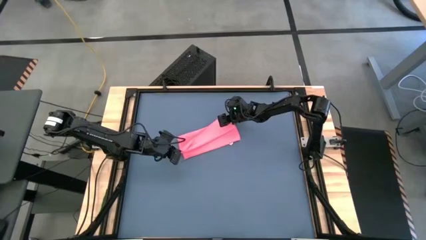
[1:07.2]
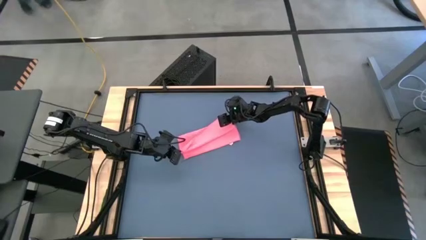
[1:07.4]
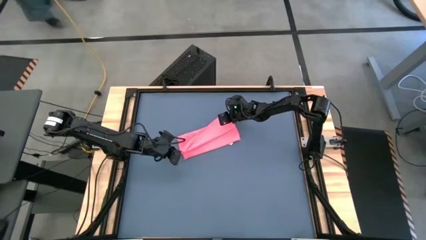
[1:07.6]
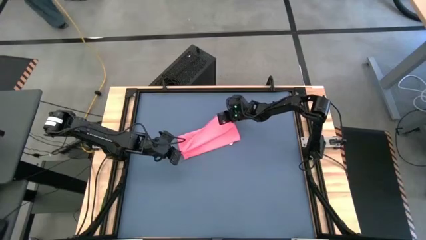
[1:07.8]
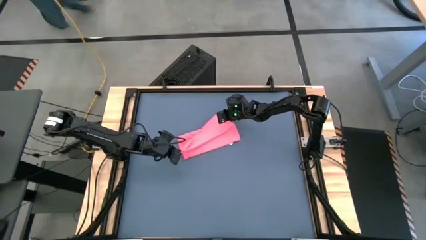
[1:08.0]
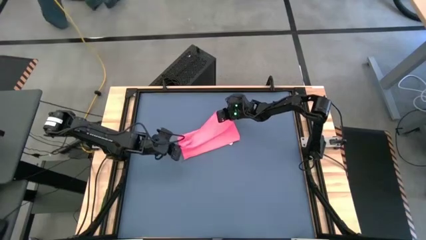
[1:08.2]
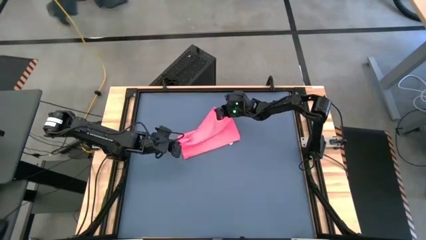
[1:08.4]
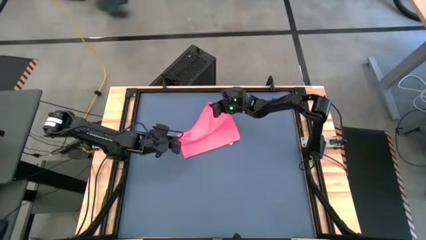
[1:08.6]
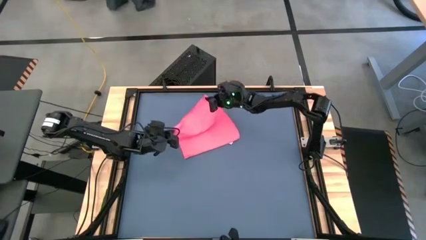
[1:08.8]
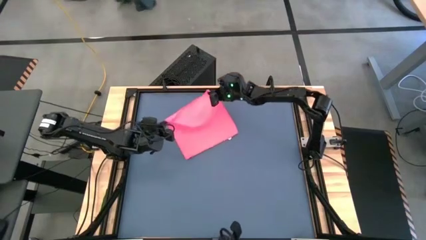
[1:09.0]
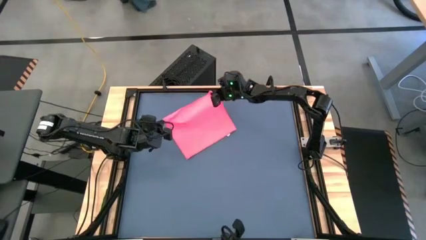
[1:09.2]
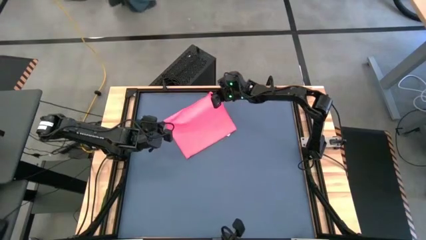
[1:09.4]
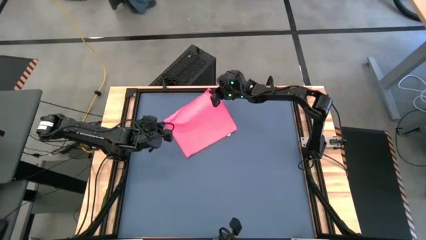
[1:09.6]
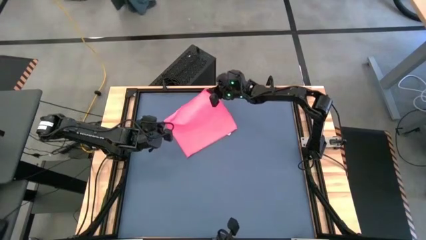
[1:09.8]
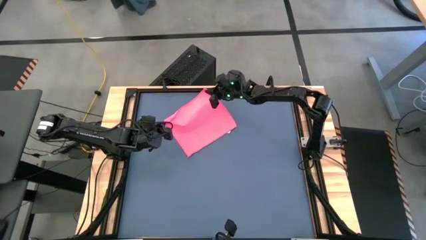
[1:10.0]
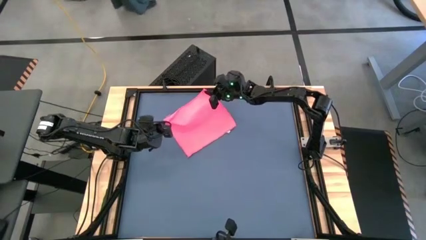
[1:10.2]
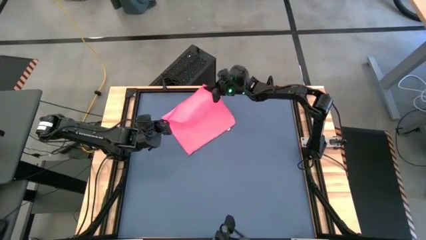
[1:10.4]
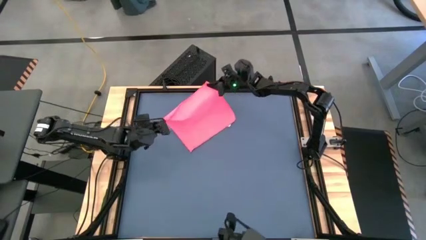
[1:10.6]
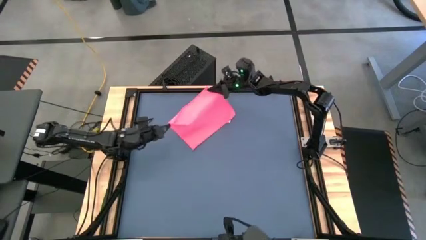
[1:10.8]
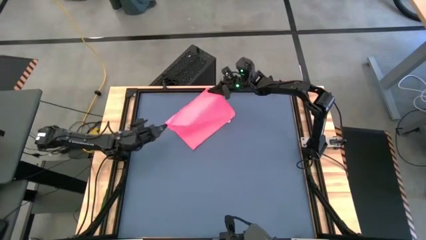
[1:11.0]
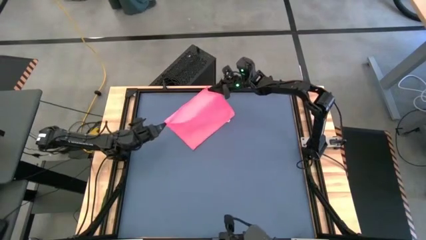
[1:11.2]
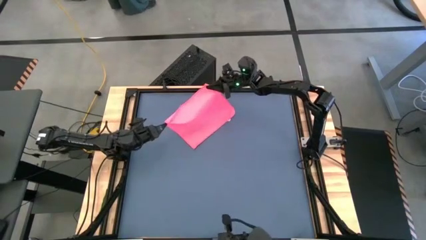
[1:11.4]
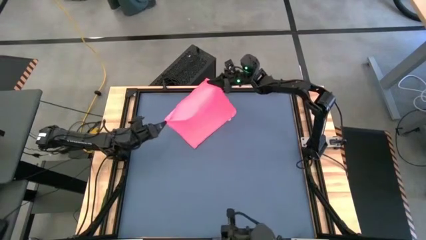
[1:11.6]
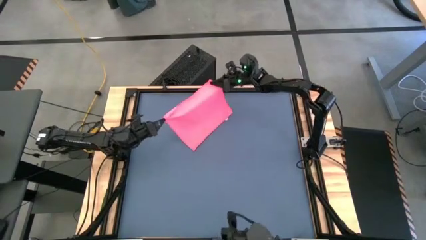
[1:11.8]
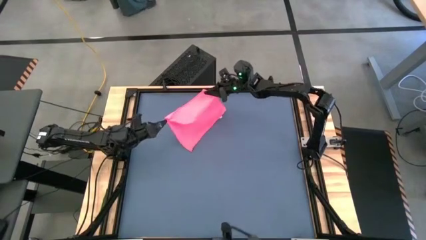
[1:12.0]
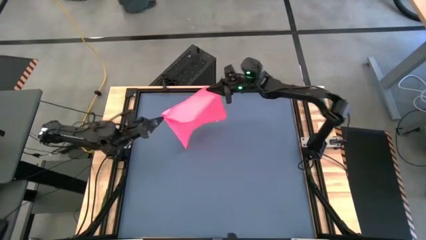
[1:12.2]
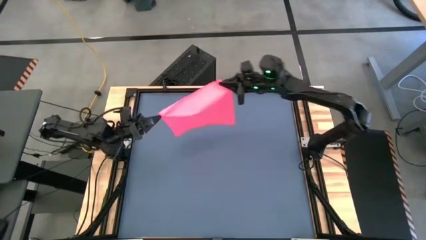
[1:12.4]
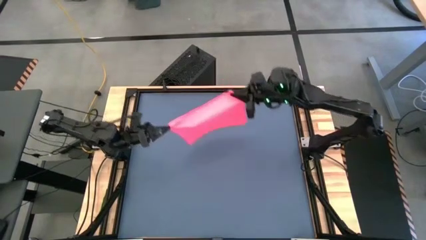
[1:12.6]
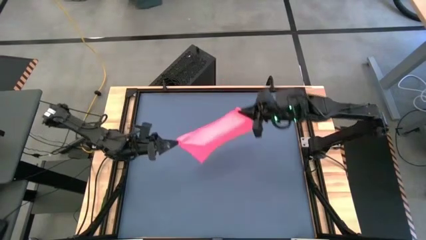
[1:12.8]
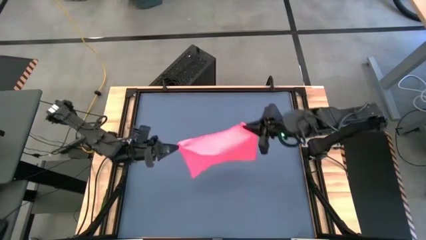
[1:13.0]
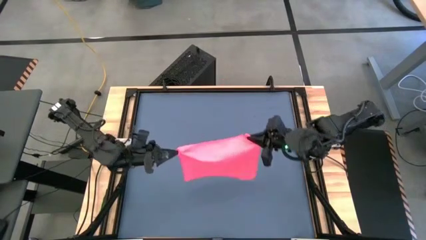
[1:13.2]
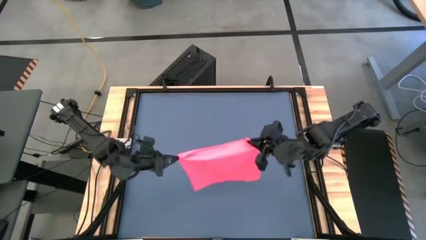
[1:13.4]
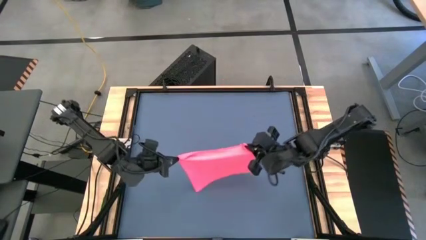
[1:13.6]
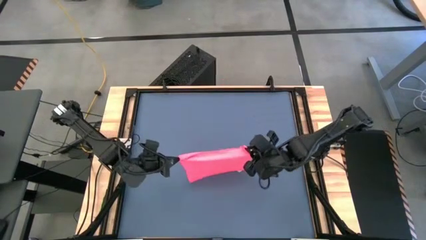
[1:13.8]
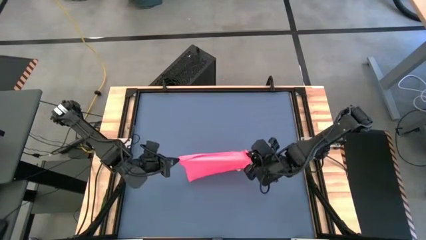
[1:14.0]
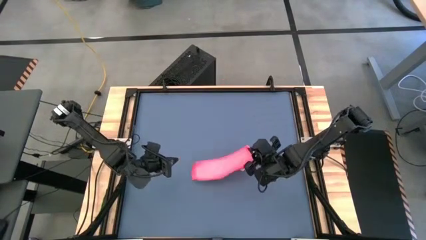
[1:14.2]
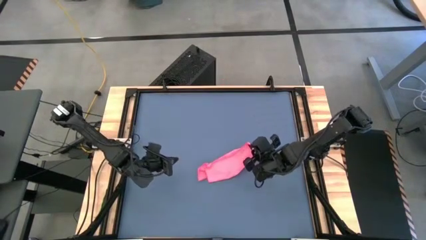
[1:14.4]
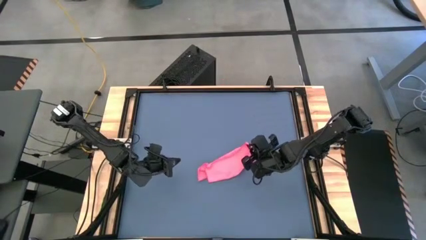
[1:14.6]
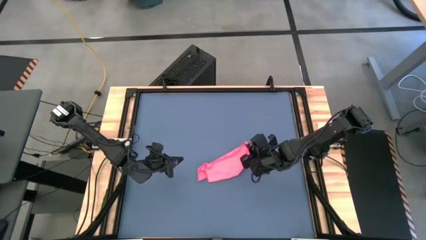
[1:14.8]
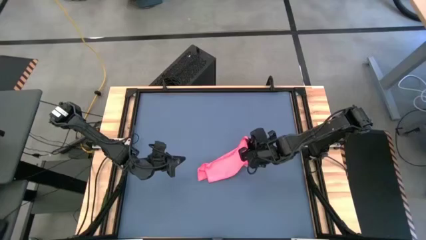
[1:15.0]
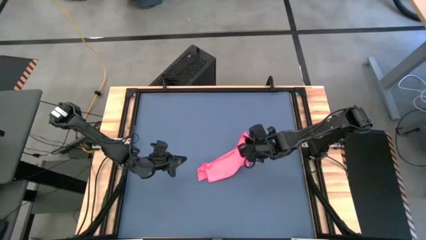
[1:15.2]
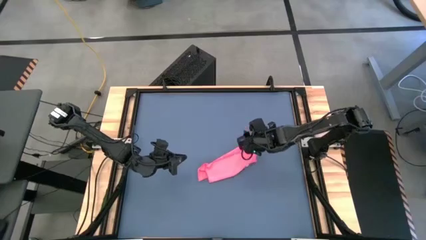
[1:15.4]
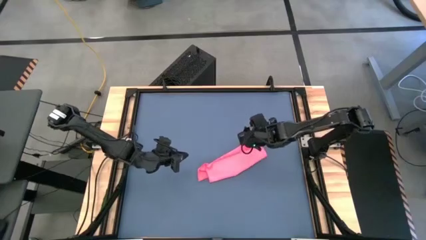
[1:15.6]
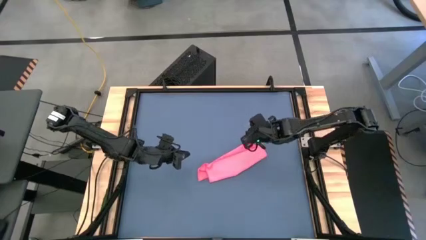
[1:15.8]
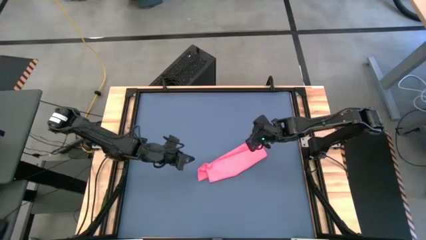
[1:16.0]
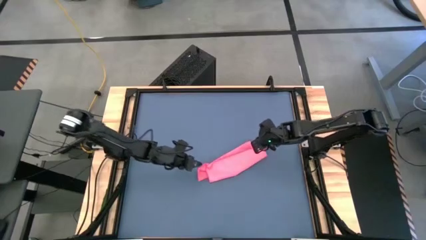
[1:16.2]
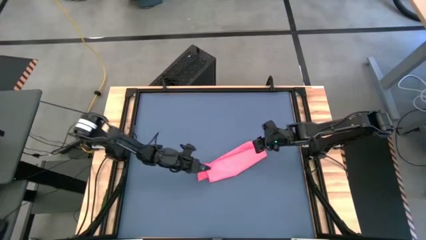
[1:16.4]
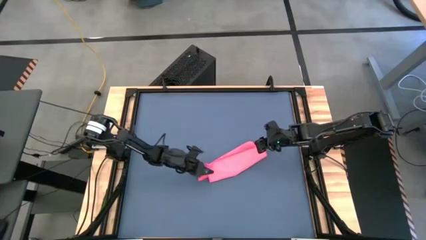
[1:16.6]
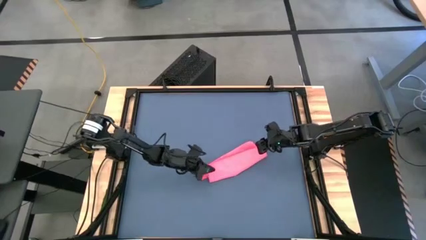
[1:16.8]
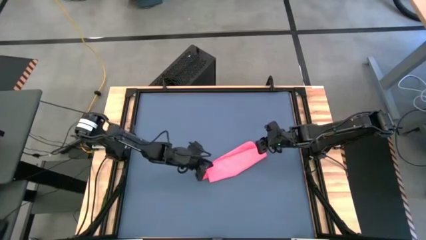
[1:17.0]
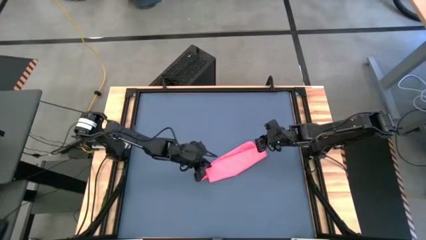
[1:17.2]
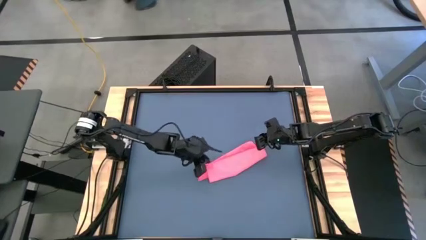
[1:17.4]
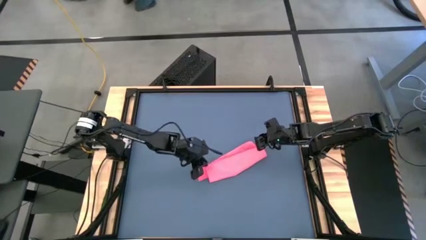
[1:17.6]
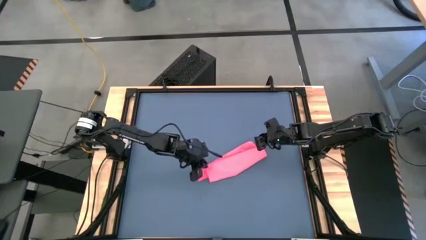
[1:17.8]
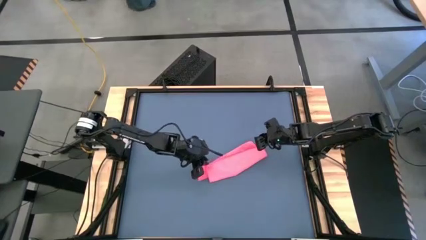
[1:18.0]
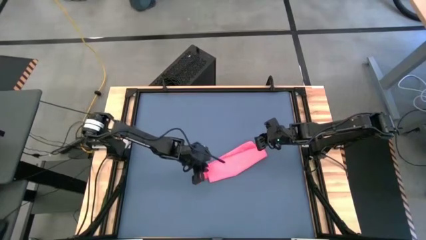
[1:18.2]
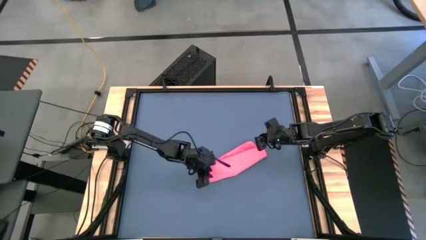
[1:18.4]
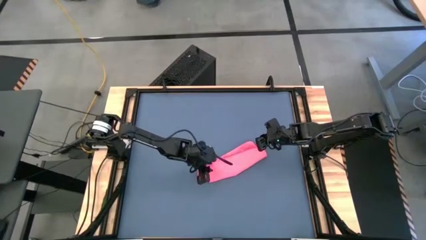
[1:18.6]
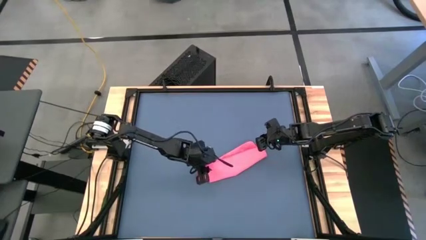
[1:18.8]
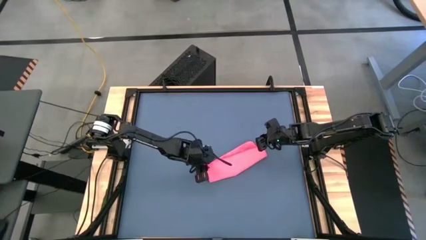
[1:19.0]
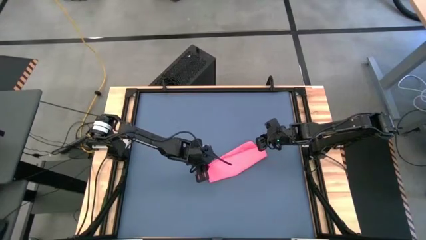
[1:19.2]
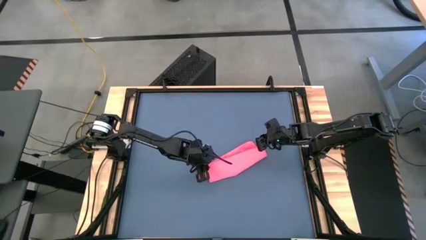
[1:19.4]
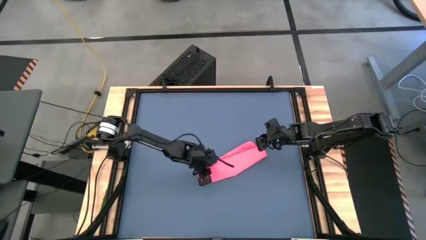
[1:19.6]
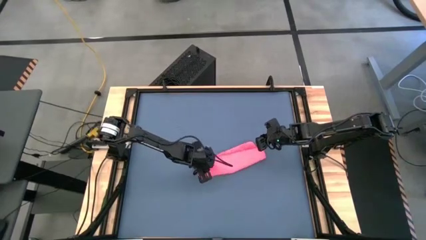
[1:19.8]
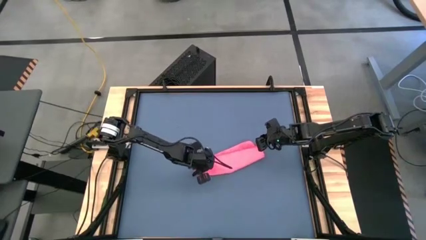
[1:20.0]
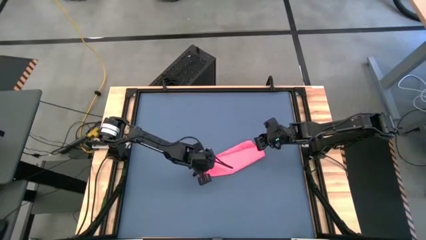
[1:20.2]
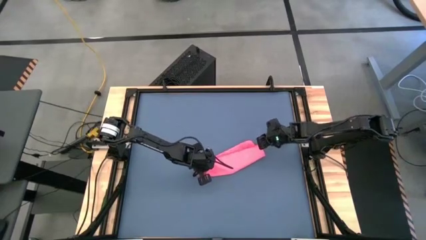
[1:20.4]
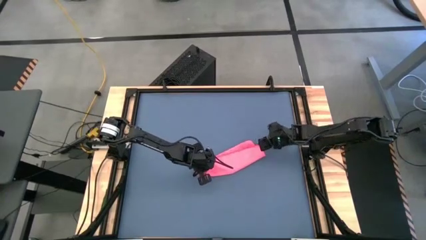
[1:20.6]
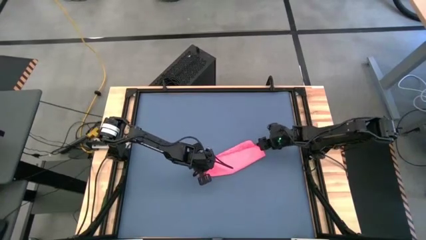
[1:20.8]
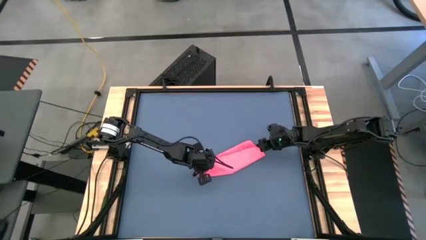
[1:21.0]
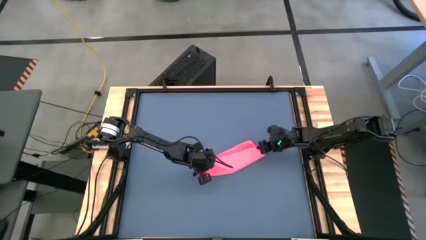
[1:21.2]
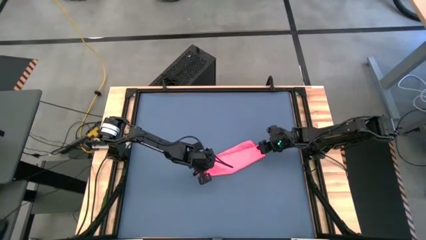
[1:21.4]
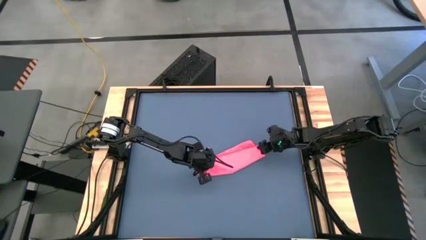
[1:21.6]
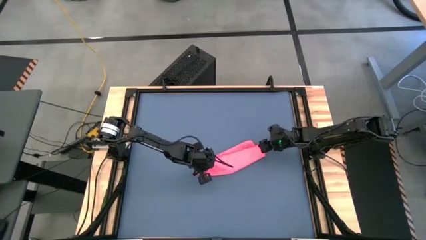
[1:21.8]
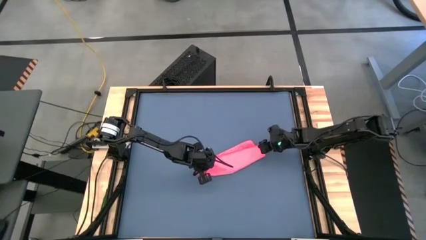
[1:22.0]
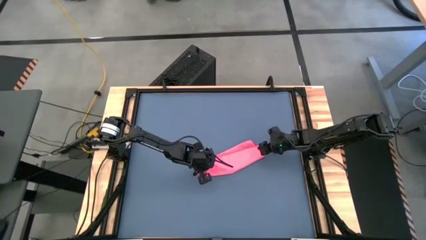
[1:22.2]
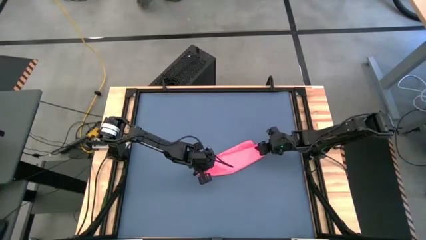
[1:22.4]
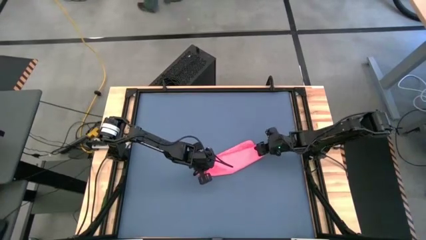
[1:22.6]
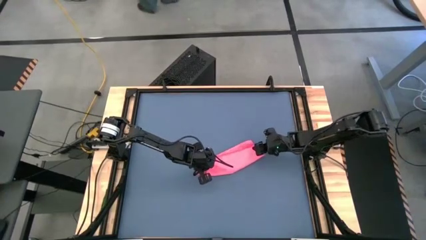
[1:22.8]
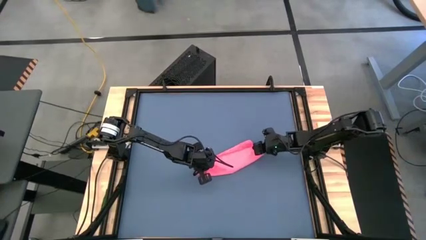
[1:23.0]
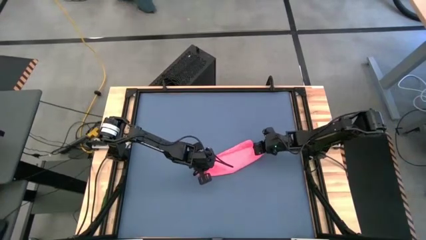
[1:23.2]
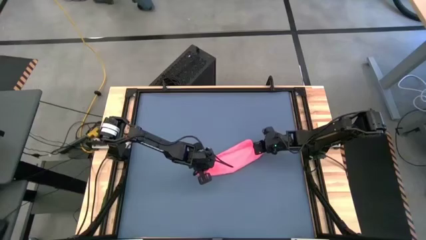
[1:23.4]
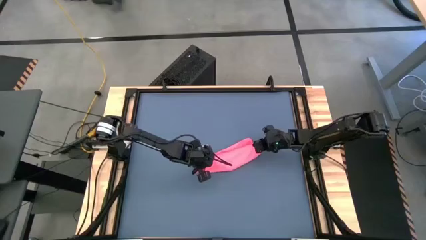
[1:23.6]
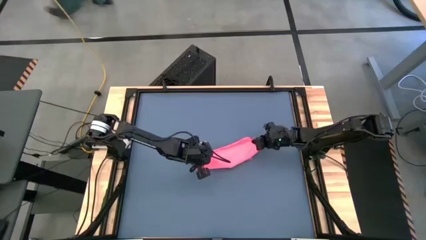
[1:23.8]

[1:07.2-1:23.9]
Task: Roll towel
Fold the pink towel
